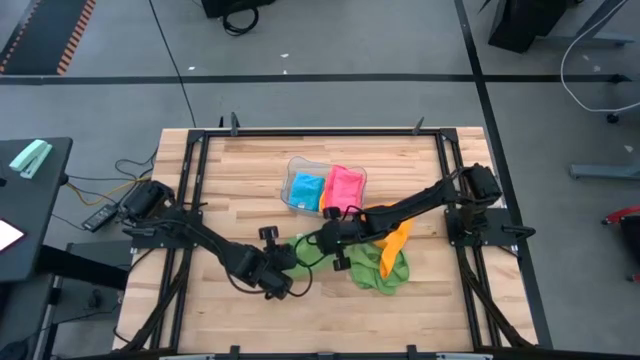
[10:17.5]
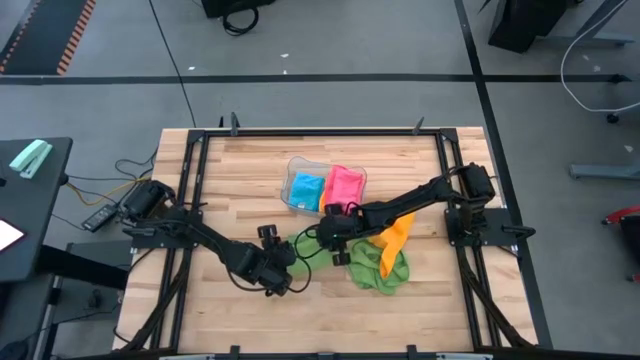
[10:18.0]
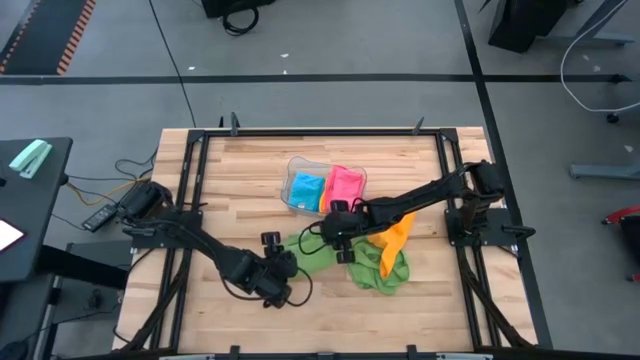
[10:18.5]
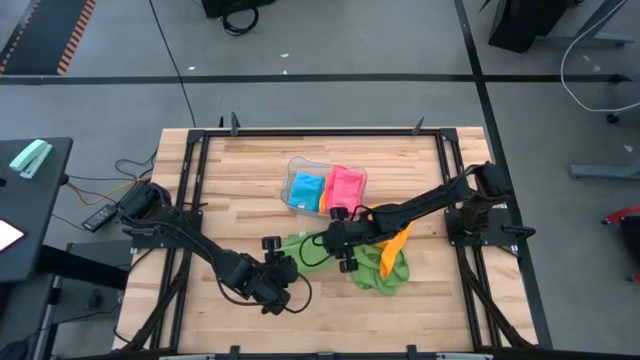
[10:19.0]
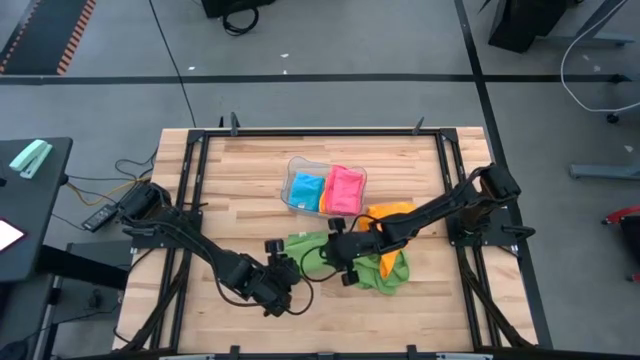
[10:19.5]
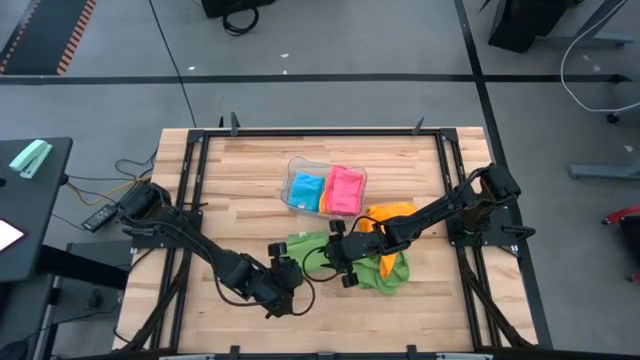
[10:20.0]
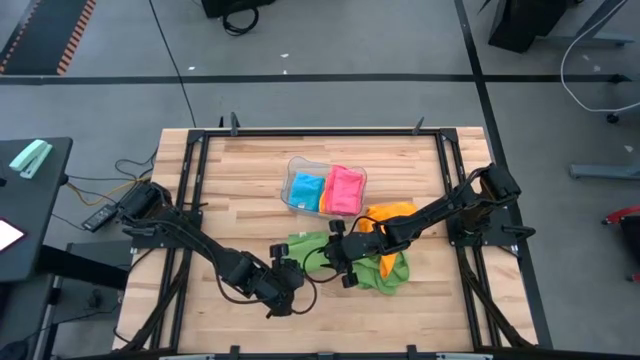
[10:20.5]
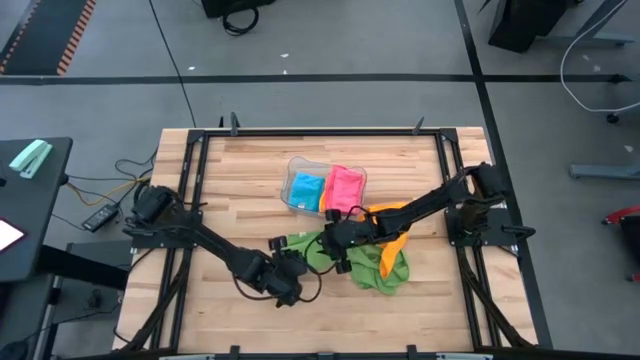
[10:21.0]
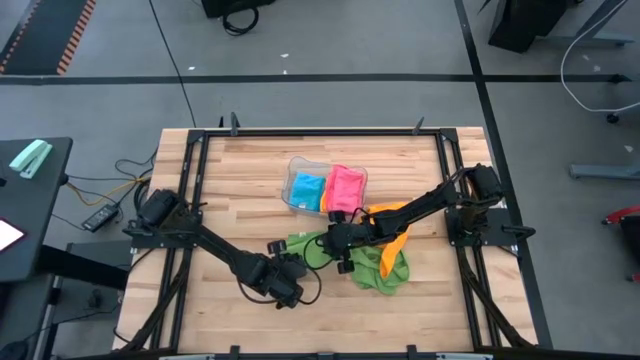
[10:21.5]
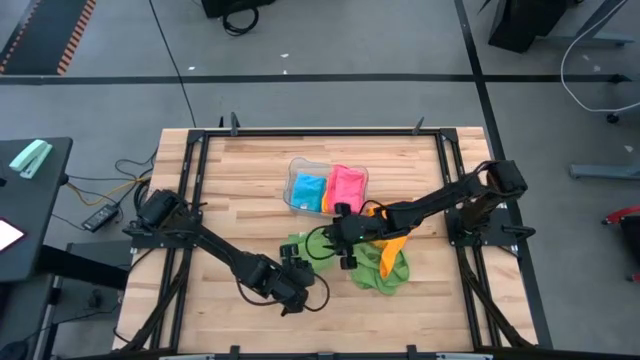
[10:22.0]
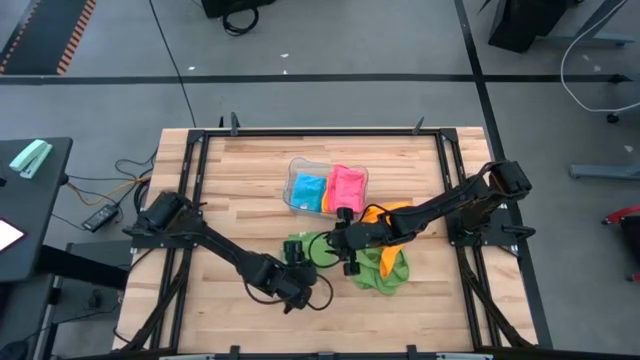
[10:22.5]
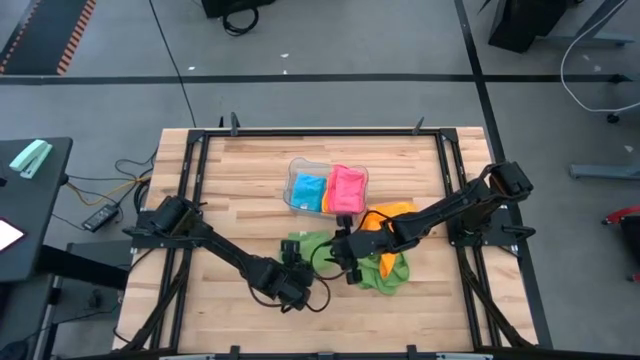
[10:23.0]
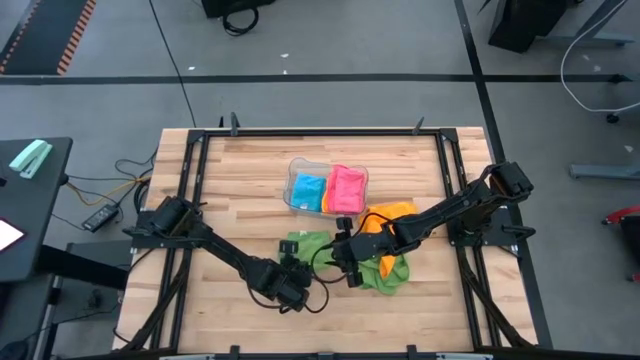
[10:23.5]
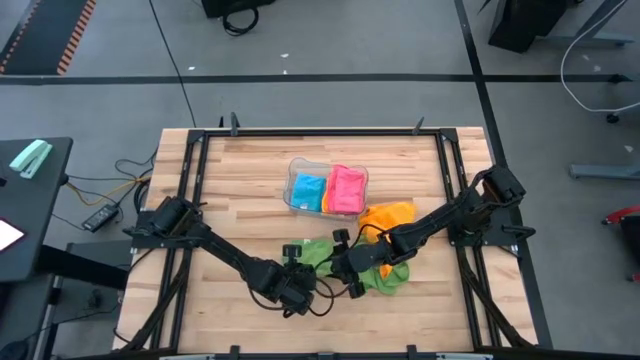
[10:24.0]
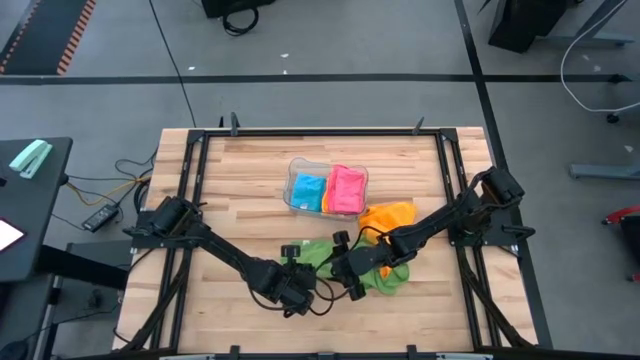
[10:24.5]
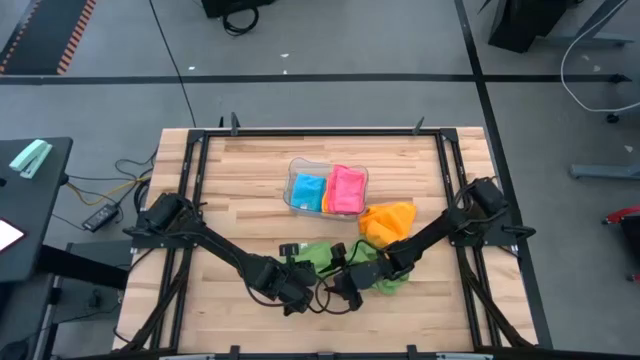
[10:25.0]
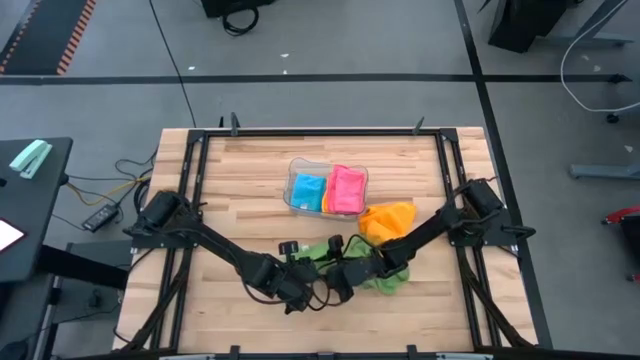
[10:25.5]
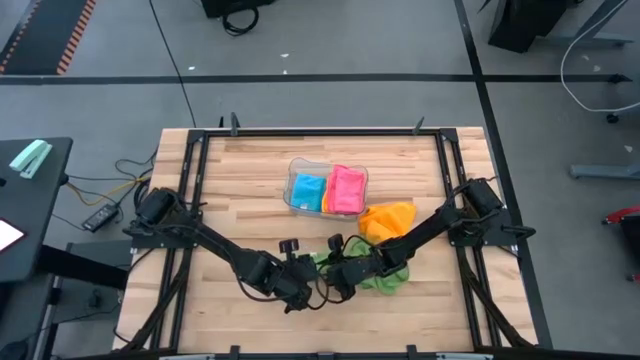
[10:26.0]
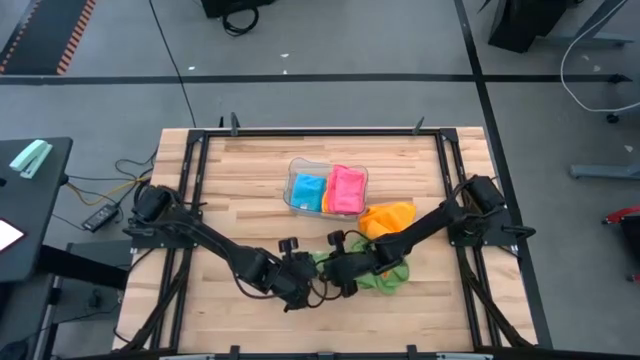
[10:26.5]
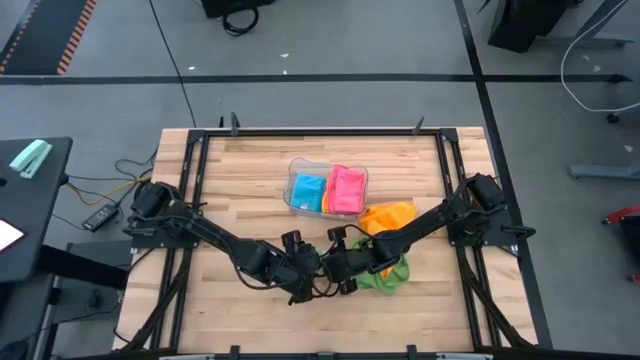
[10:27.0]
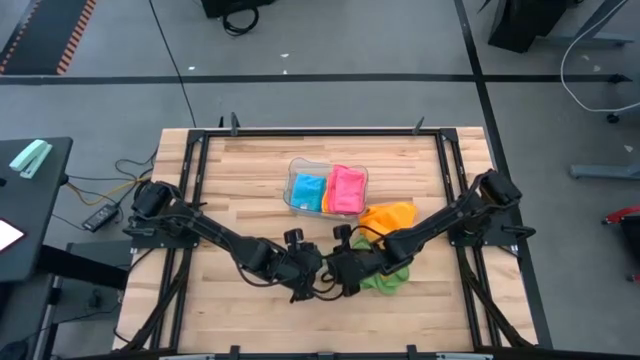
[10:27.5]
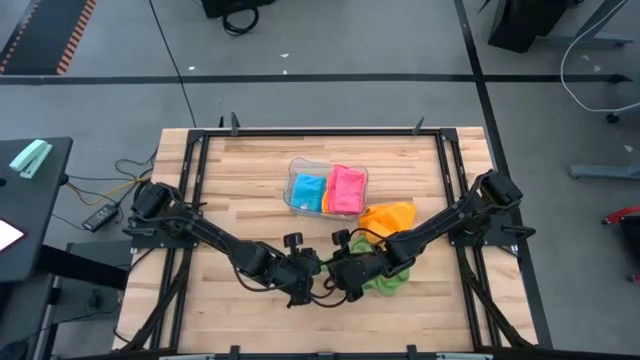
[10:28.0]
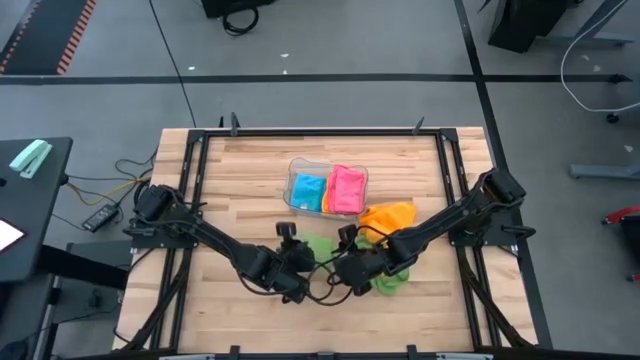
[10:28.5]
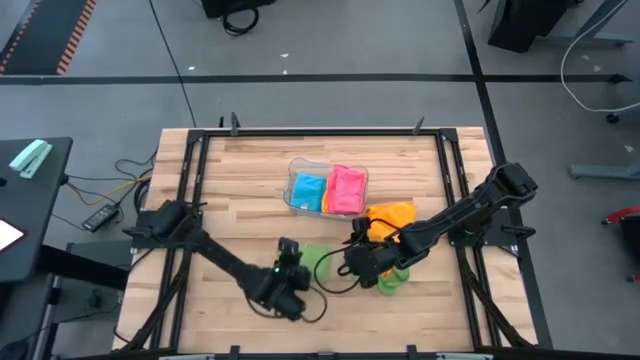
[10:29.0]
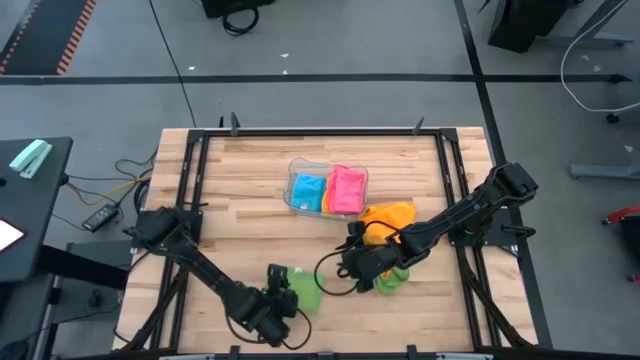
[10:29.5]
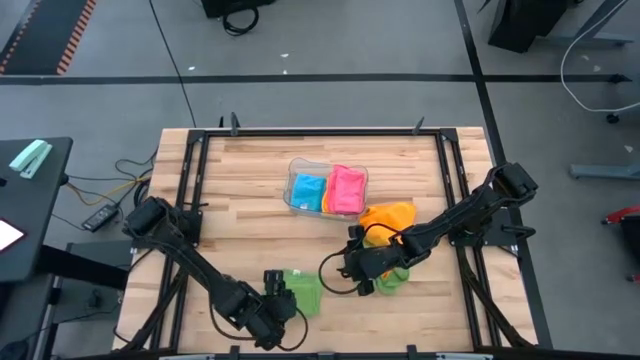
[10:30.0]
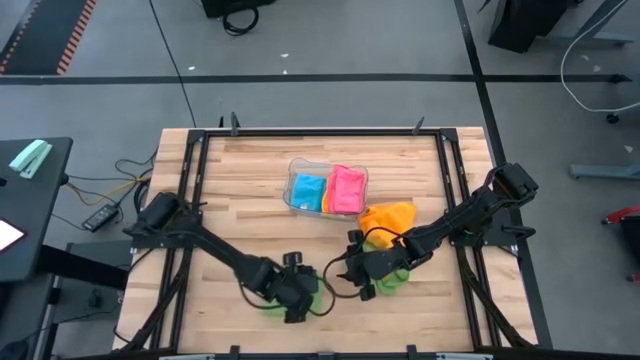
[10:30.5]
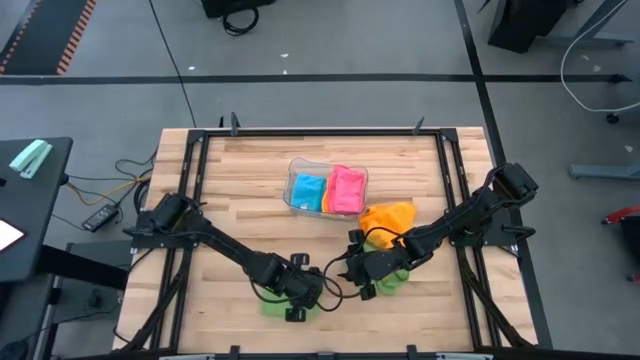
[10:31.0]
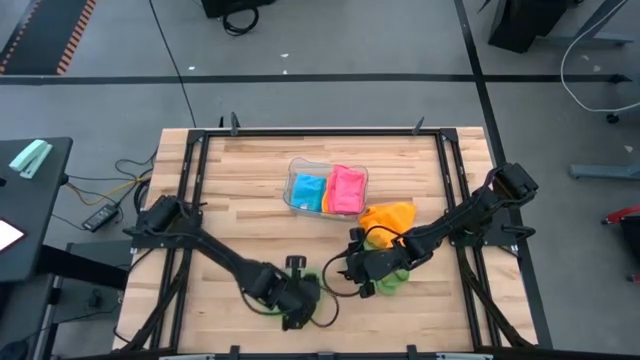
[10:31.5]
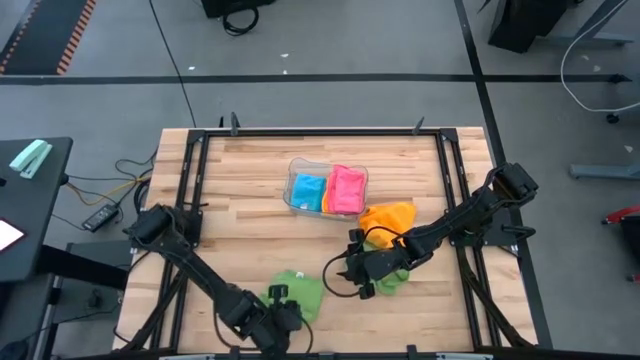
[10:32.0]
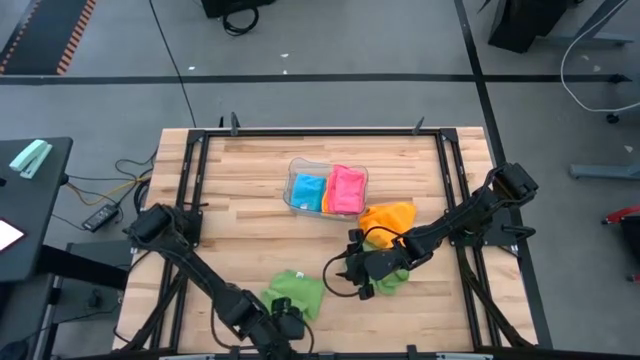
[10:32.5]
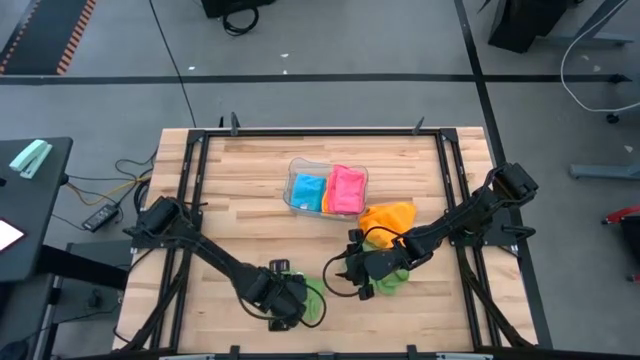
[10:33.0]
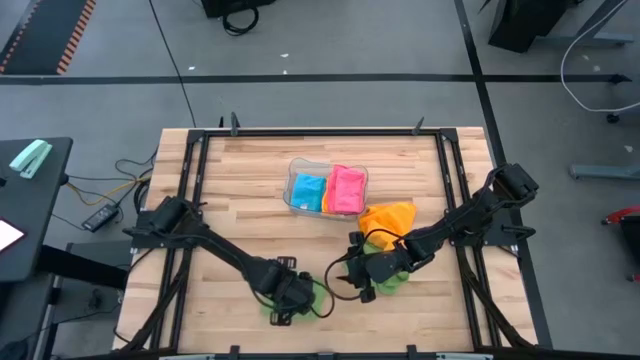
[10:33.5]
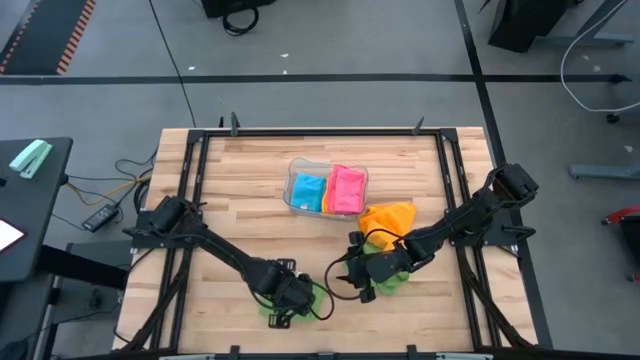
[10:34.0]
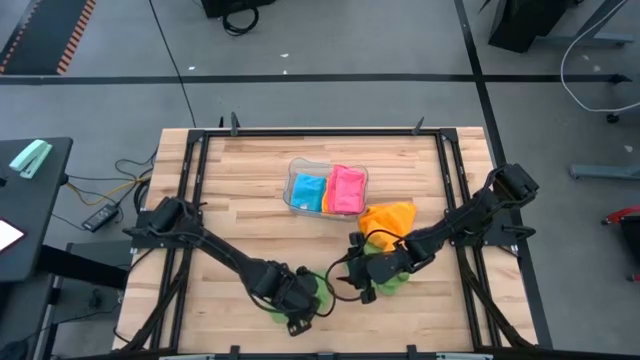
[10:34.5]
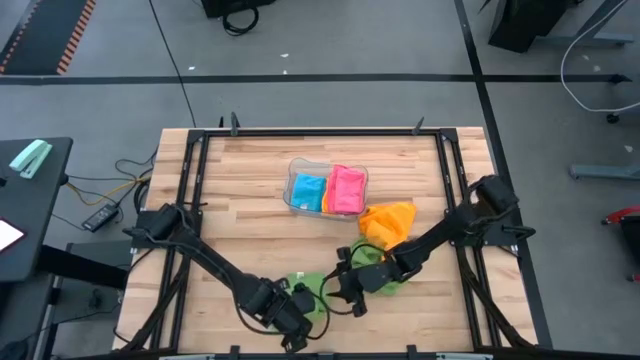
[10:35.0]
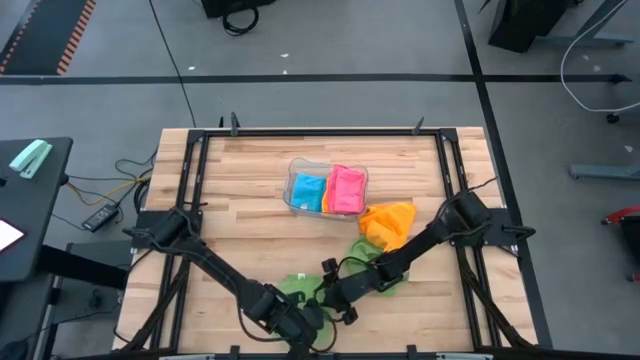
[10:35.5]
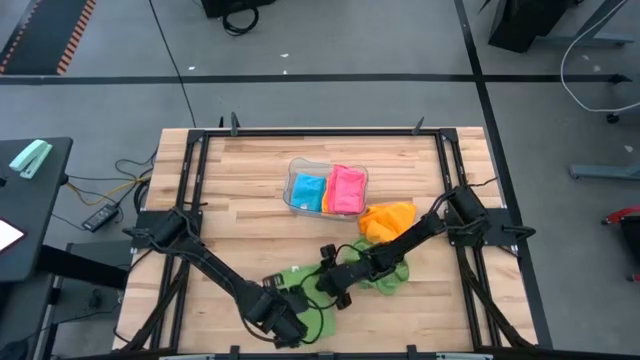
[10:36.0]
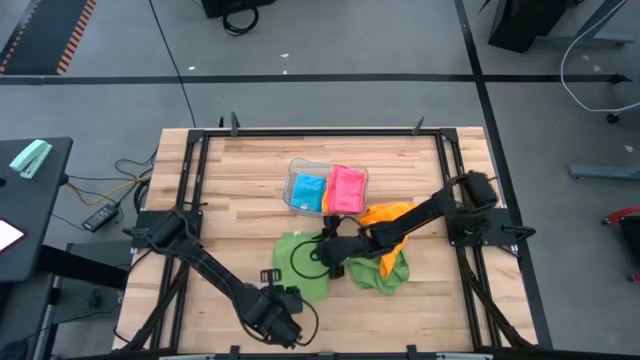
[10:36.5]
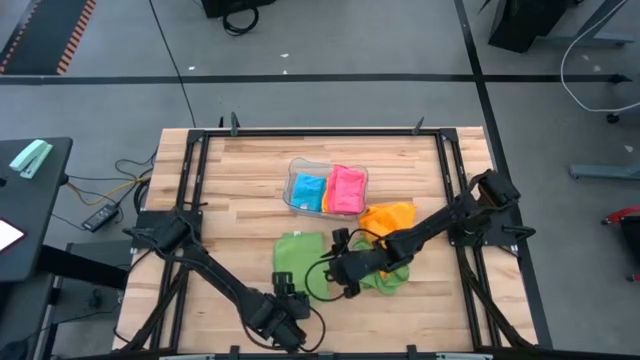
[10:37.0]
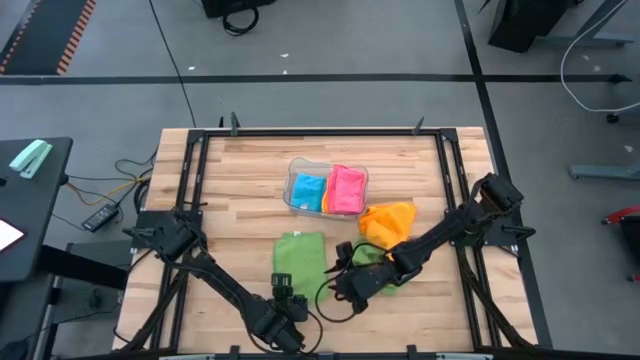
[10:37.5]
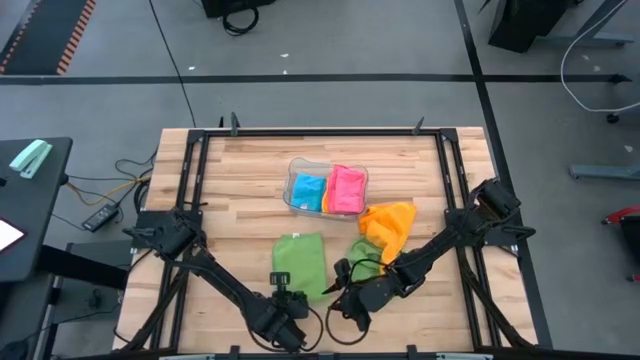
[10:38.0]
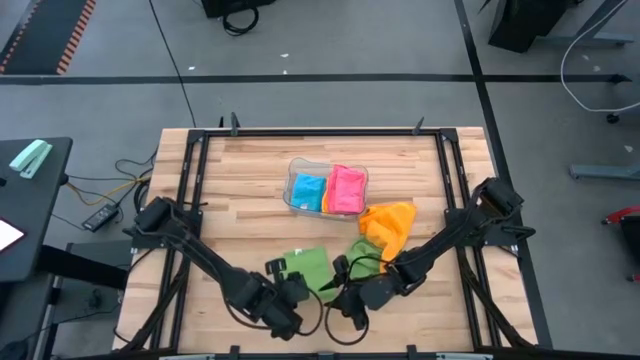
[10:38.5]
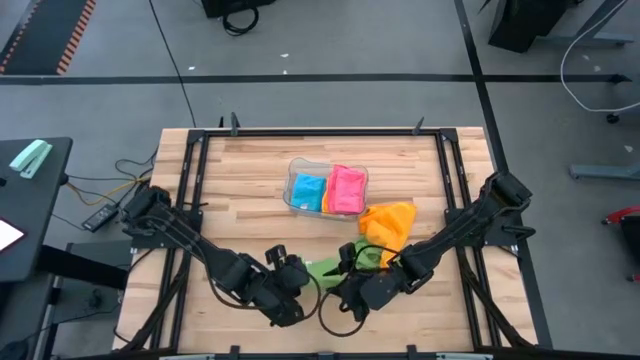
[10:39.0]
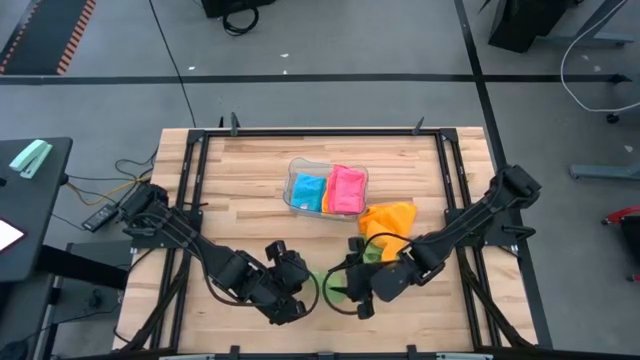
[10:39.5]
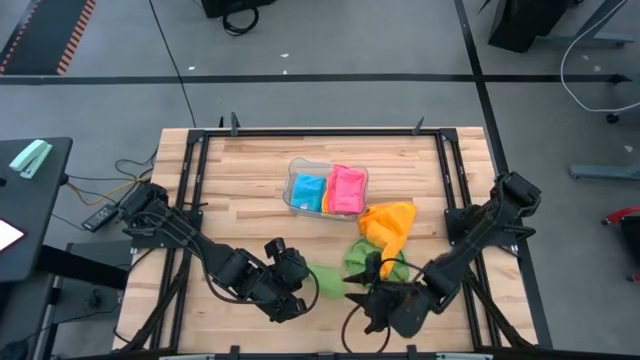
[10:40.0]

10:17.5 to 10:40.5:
Task: Fold microfiber towels
Fold the top green microfiber cloth
